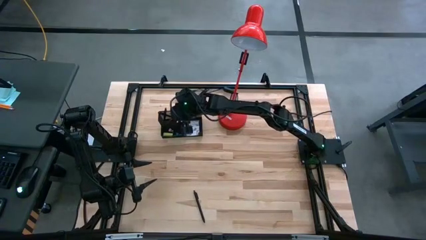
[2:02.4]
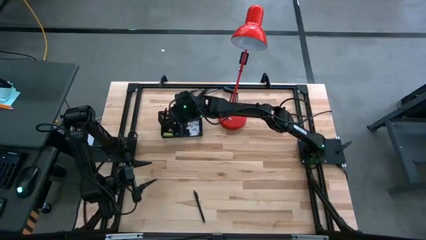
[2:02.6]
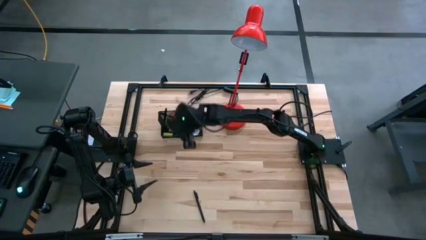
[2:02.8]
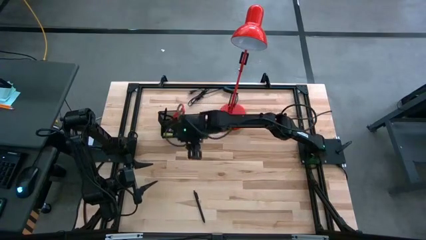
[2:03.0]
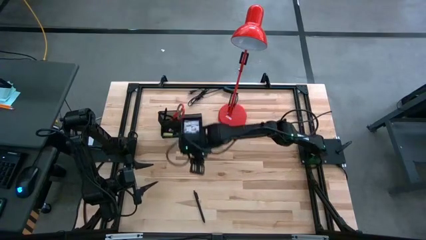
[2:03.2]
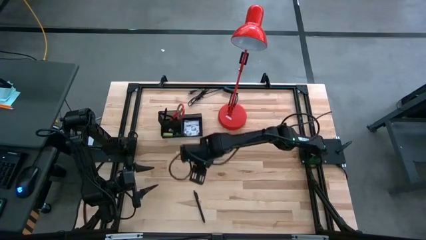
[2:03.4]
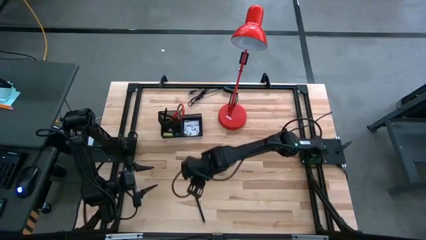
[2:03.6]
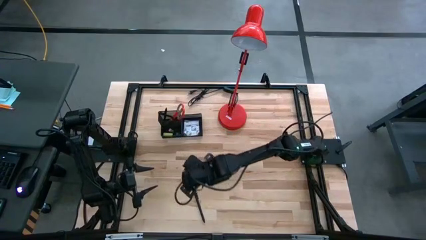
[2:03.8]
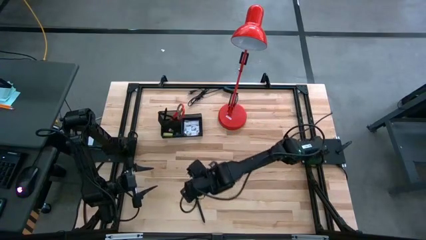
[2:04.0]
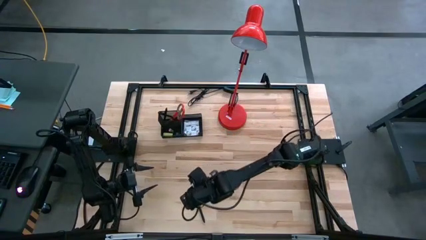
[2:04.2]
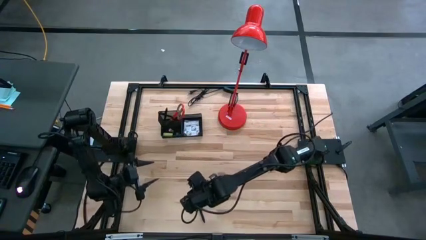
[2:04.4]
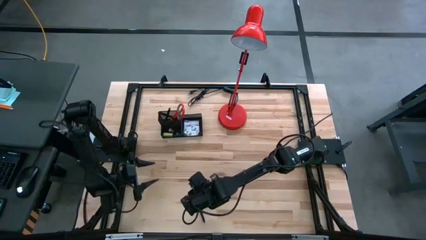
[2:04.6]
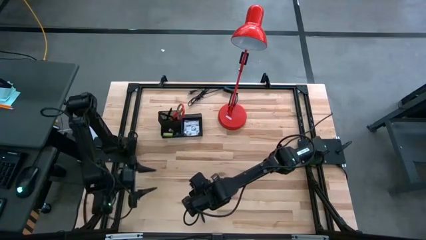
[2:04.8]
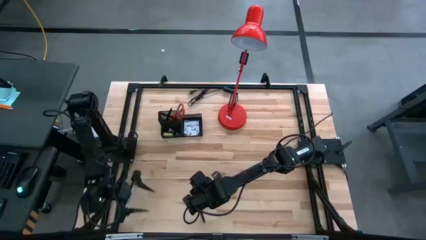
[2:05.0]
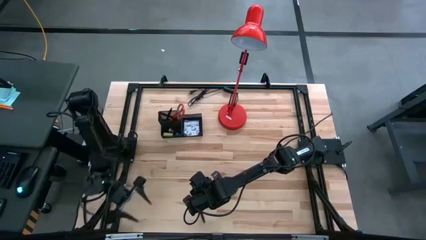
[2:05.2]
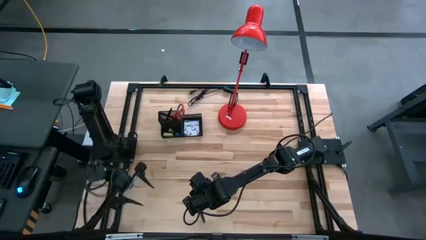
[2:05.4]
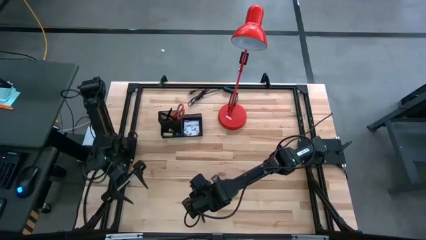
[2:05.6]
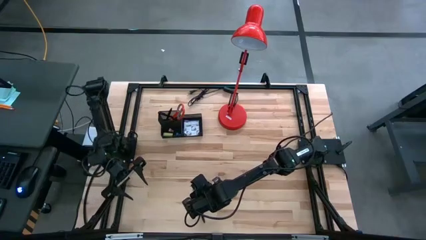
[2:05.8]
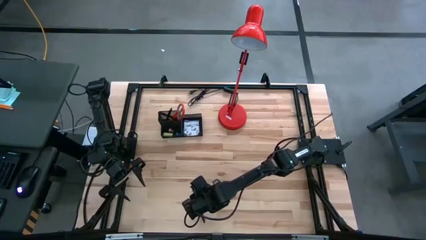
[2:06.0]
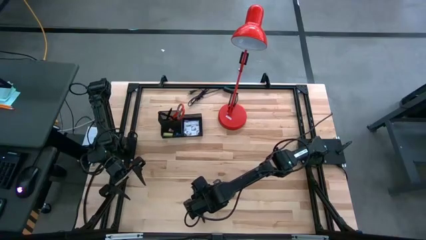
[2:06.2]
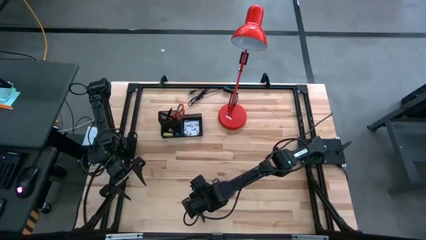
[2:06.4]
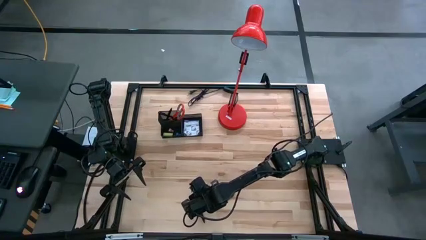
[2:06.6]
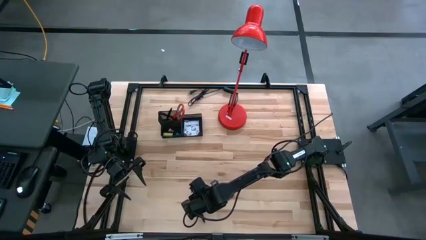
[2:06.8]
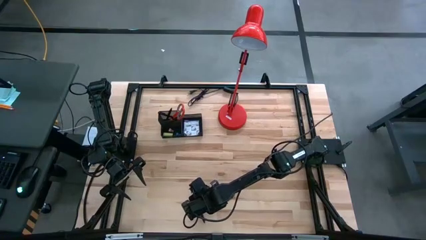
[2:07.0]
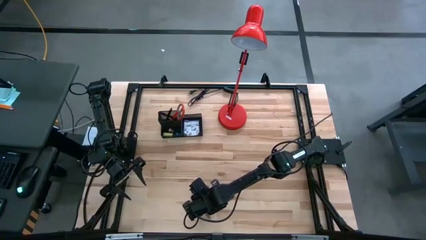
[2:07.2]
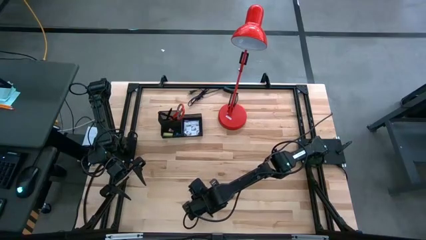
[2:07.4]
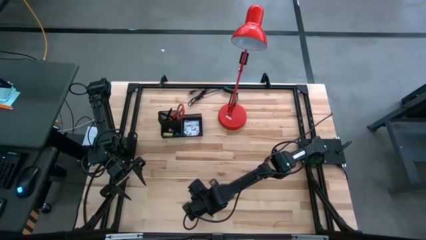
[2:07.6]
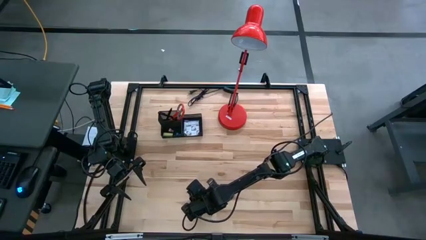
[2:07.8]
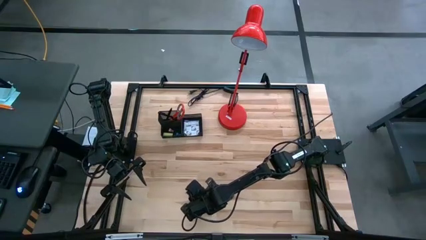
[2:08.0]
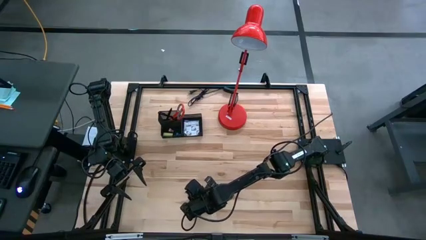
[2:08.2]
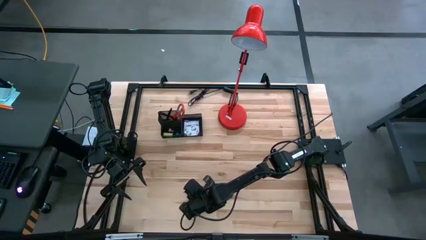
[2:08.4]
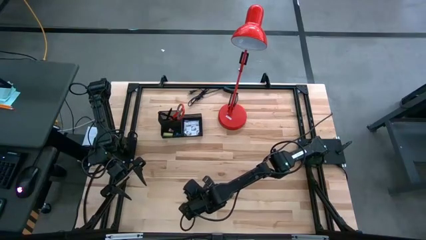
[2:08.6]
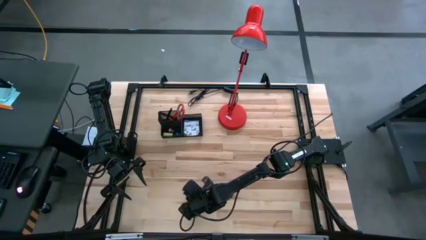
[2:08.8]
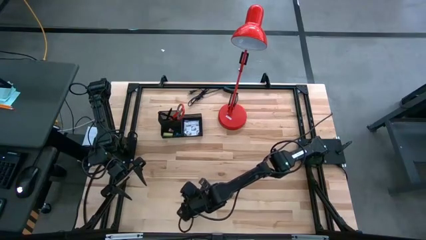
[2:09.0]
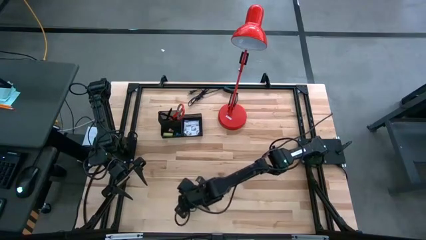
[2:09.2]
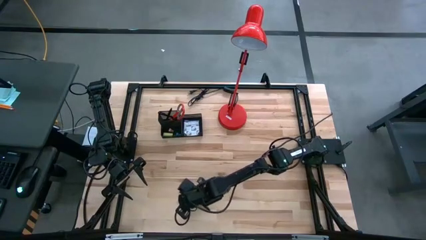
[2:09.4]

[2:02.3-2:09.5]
Task: Pick and place office supplies into organizer
Put the black pen into the black desk organizer

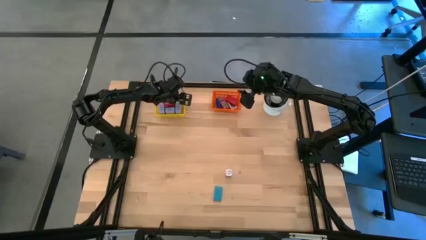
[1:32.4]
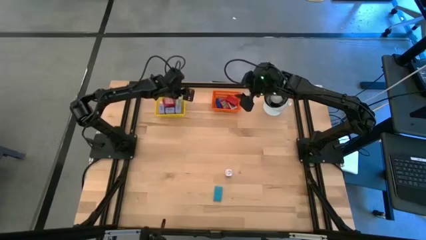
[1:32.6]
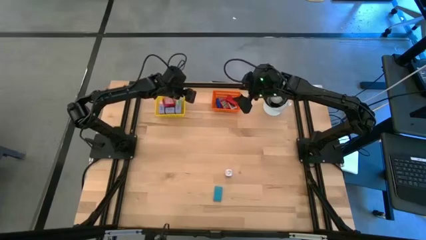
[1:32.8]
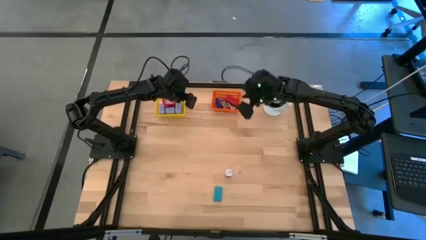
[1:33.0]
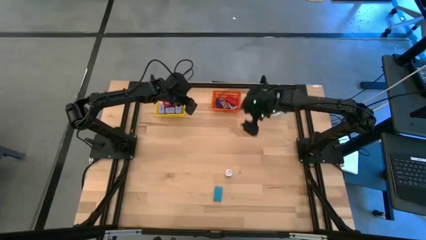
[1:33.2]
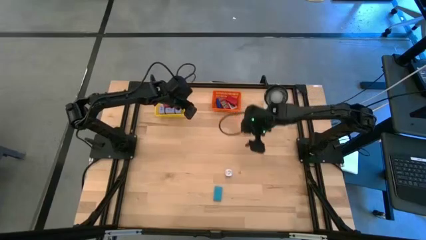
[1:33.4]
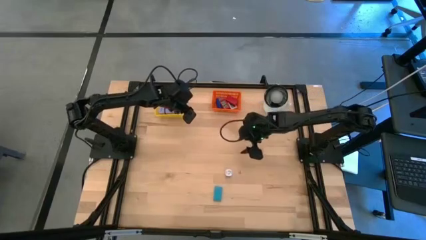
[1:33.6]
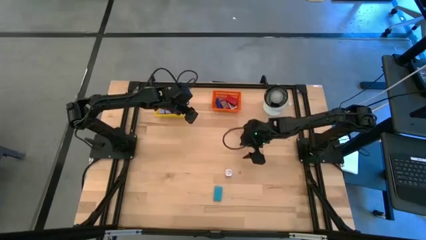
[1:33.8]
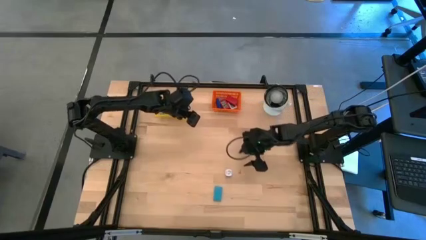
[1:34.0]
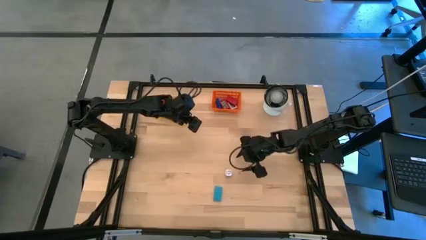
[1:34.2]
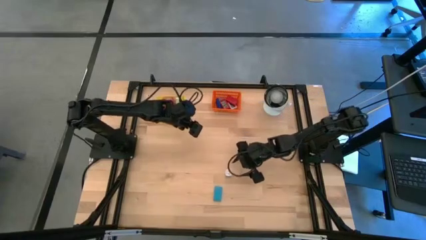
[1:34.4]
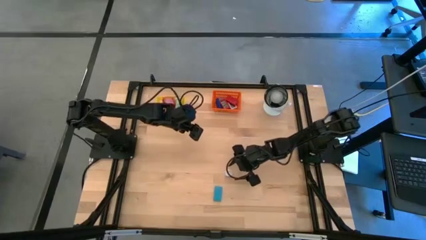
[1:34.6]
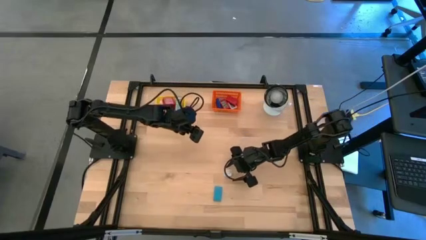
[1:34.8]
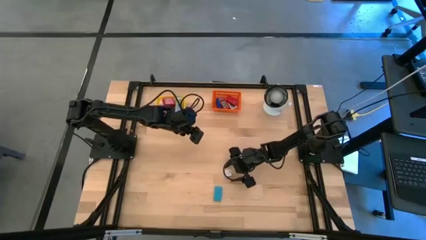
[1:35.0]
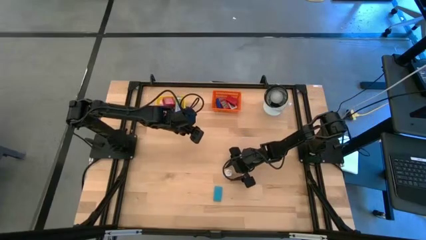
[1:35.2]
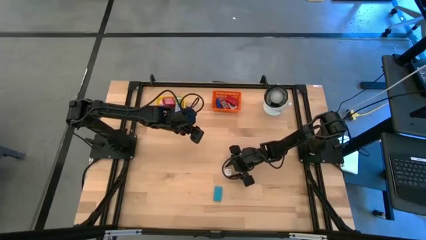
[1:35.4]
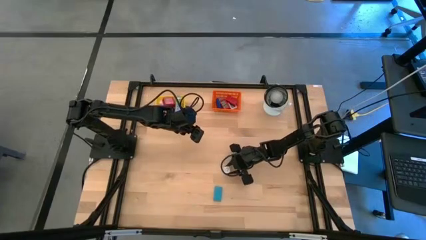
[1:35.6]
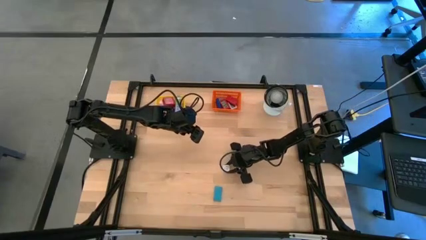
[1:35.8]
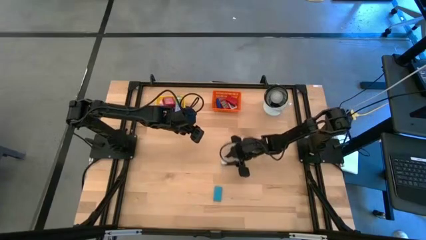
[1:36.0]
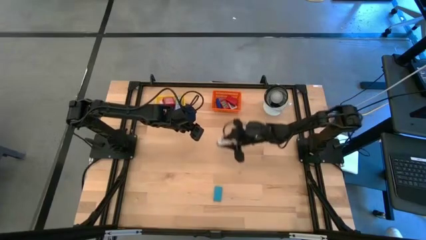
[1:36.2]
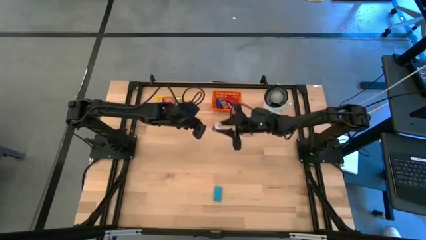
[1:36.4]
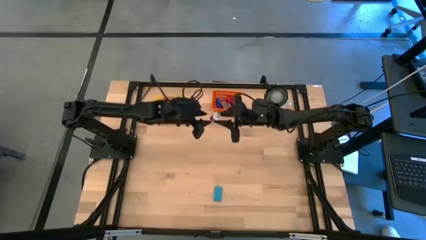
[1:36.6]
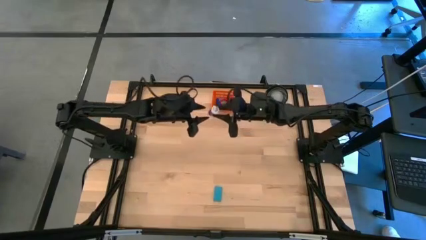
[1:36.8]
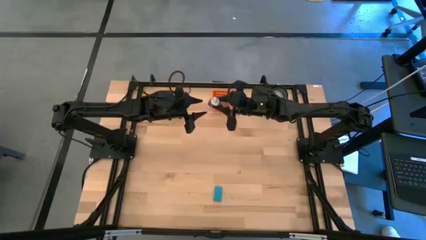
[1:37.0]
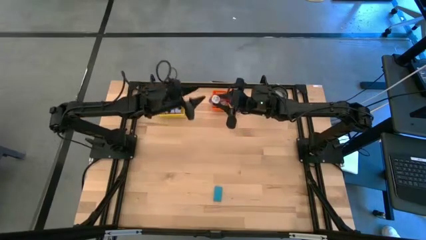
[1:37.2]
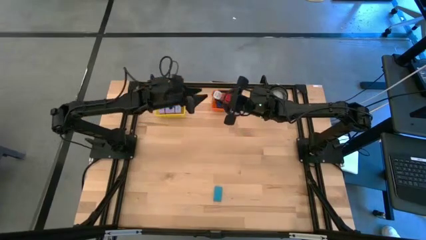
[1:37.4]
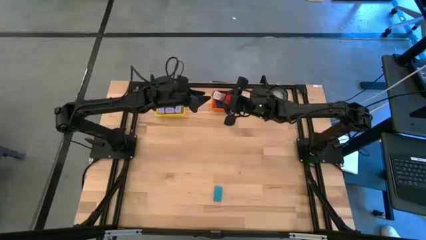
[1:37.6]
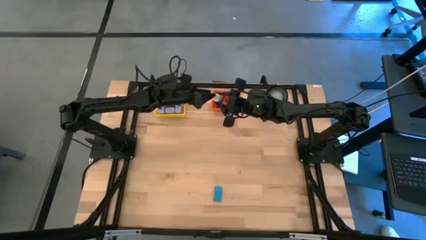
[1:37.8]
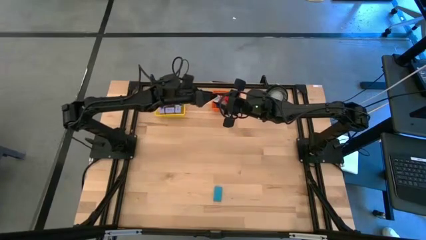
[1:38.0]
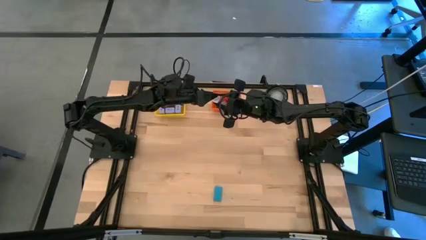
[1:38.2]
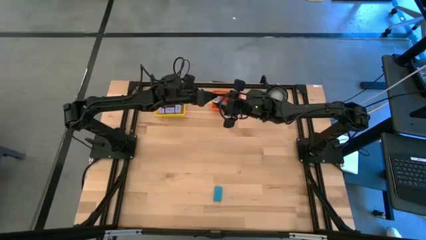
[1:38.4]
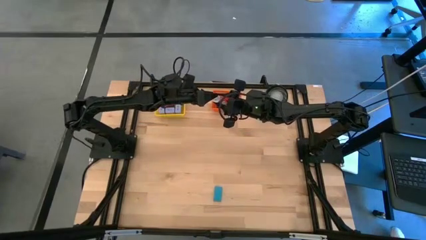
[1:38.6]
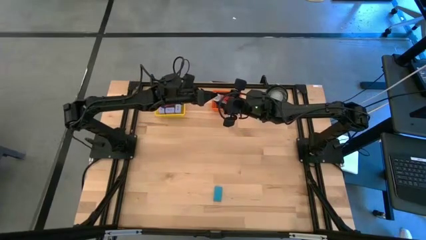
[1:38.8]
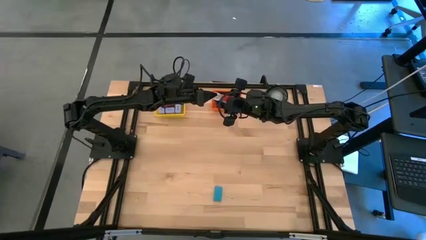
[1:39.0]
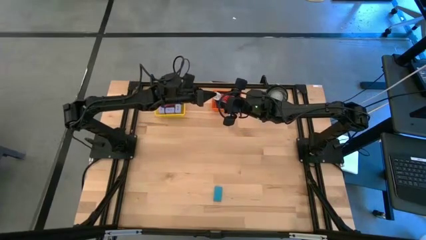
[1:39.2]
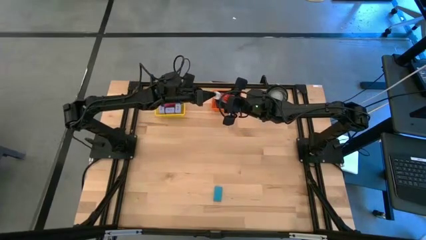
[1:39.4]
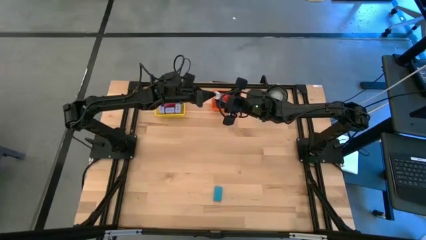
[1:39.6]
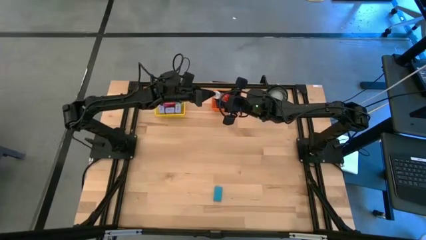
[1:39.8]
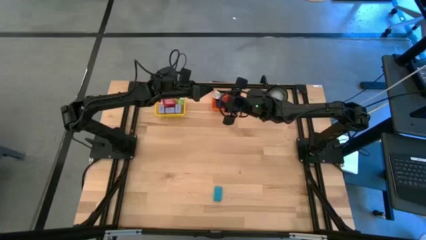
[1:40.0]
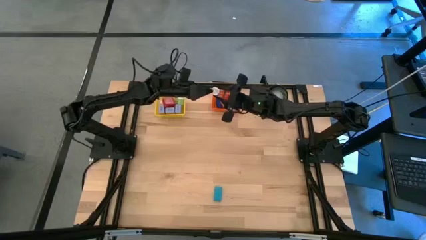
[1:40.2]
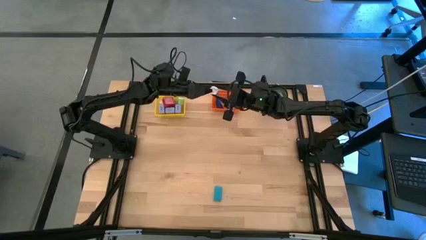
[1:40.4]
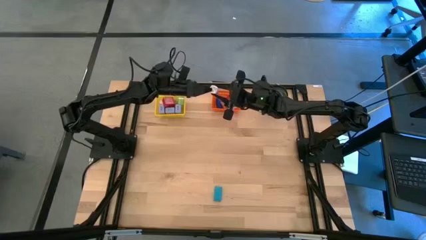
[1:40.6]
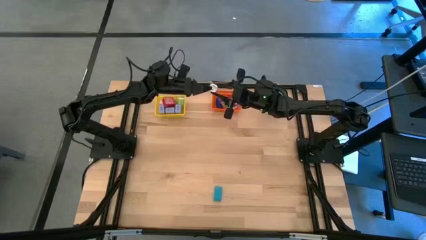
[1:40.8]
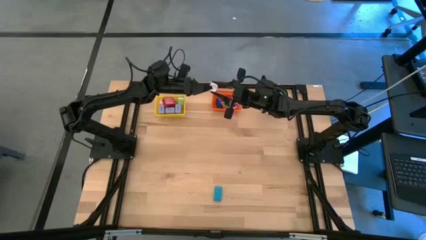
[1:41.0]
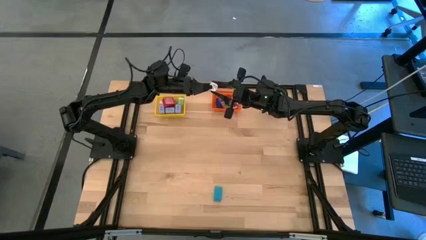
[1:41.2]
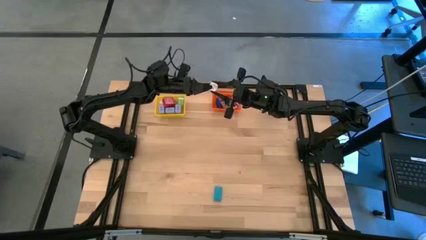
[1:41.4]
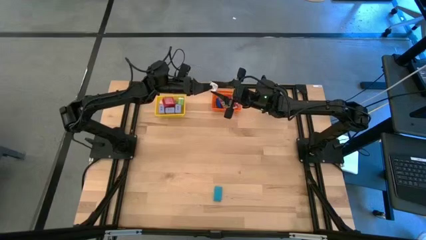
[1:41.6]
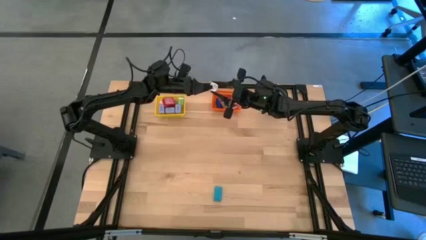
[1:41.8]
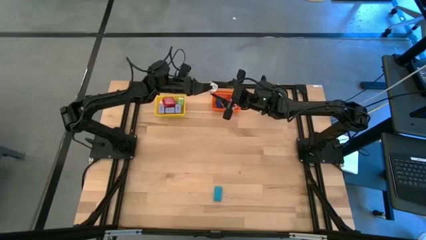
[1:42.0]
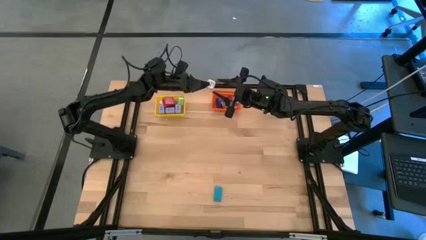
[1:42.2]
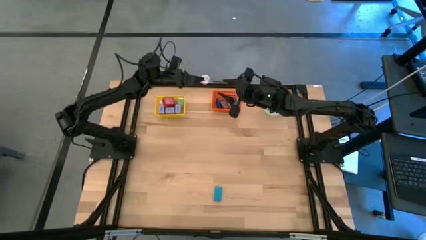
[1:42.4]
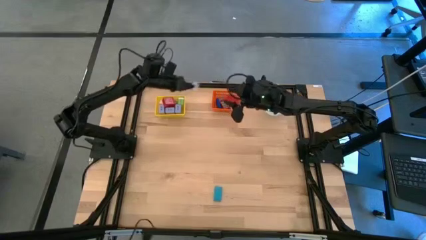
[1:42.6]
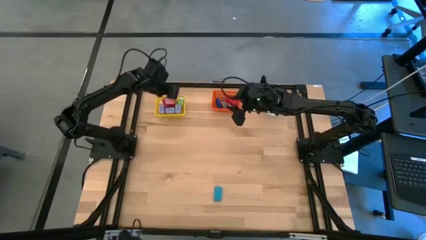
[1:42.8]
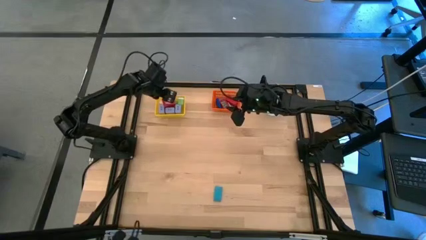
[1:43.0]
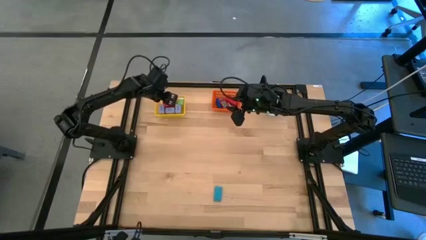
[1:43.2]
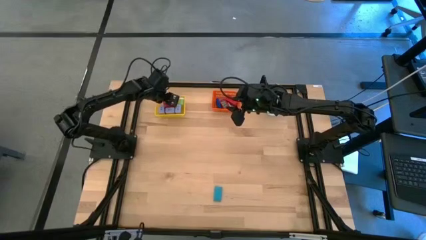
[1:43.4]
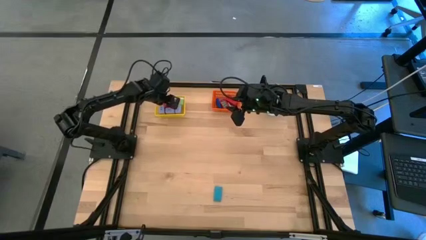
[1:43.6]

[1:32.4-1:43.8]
Task: Pick & Place Office items
Put the violet changer adapter into the yellow bin
